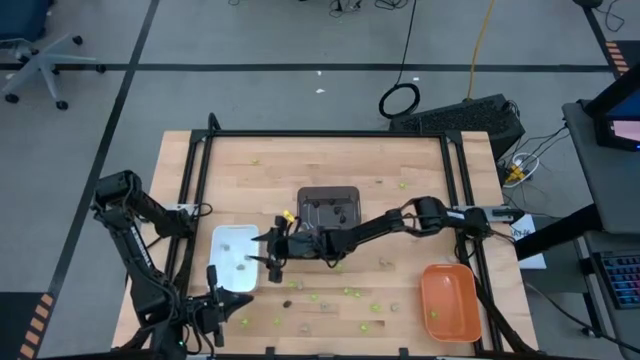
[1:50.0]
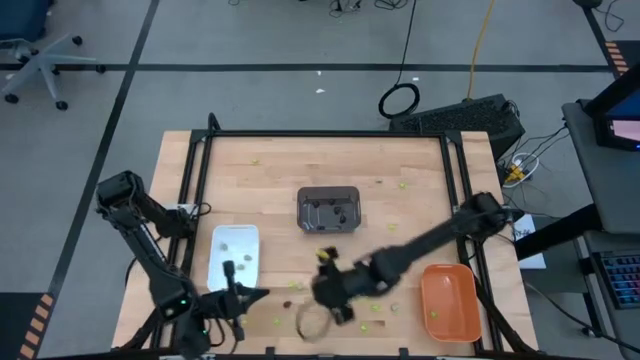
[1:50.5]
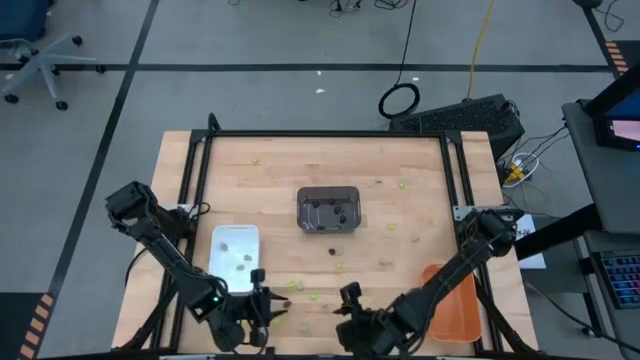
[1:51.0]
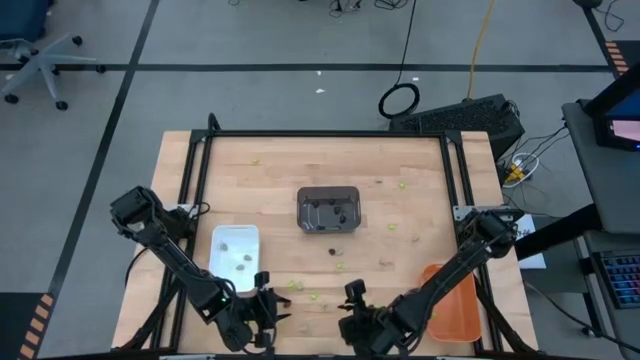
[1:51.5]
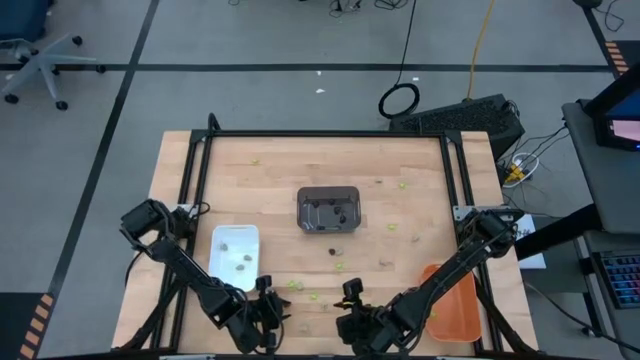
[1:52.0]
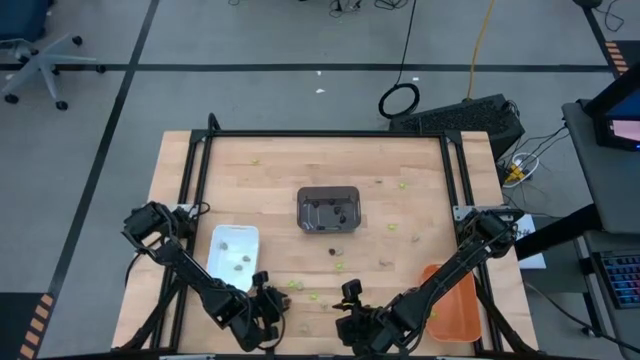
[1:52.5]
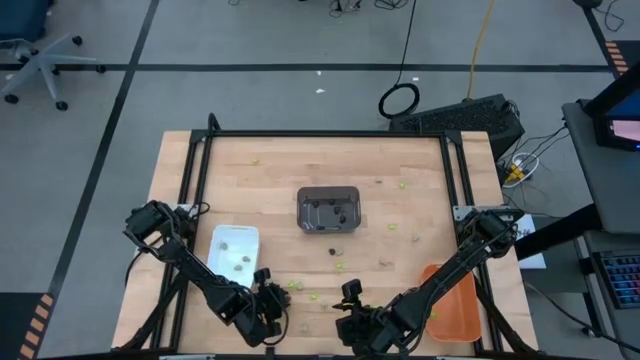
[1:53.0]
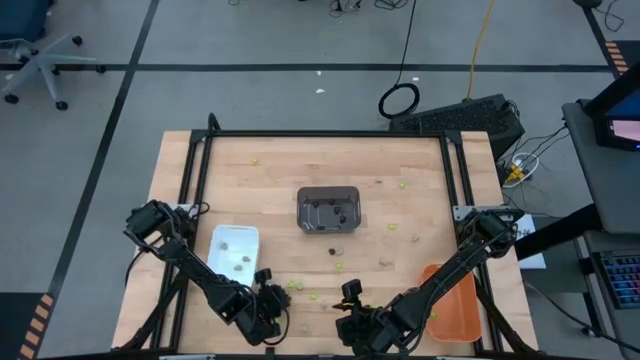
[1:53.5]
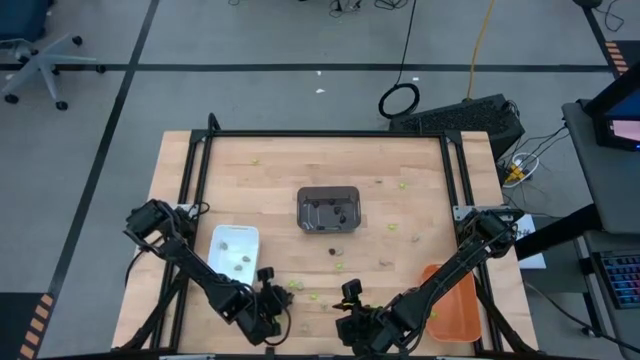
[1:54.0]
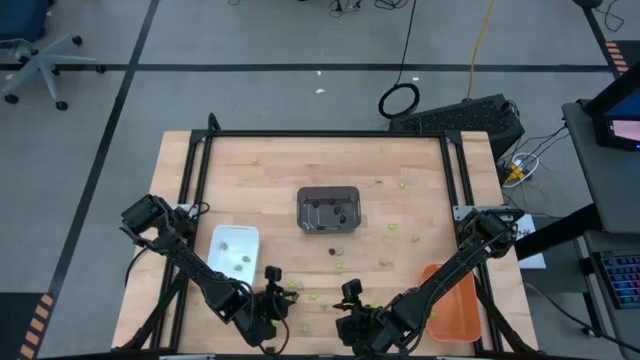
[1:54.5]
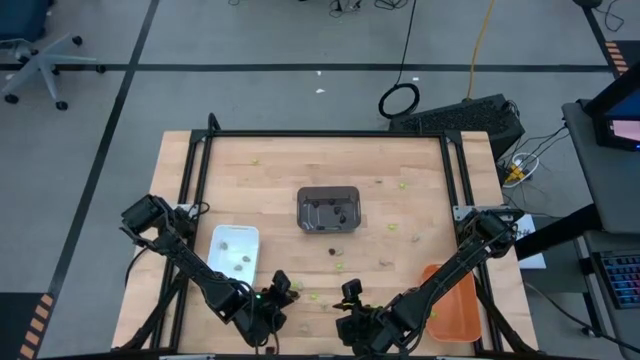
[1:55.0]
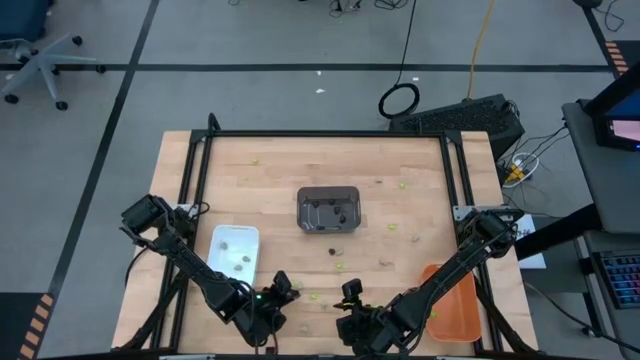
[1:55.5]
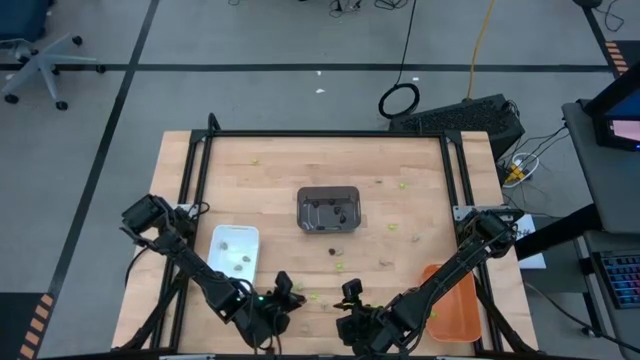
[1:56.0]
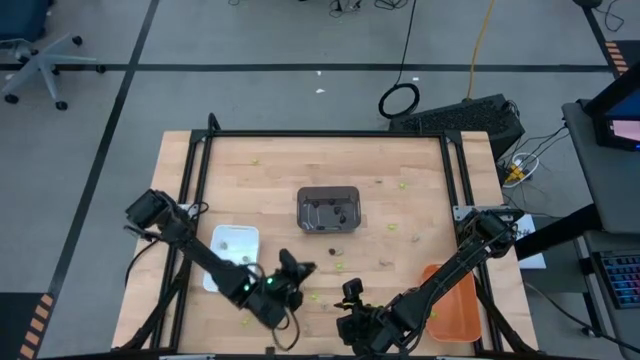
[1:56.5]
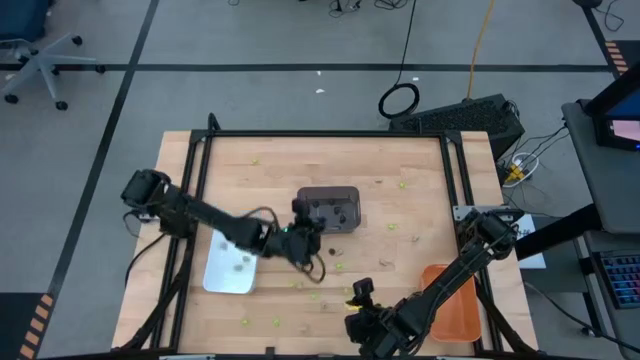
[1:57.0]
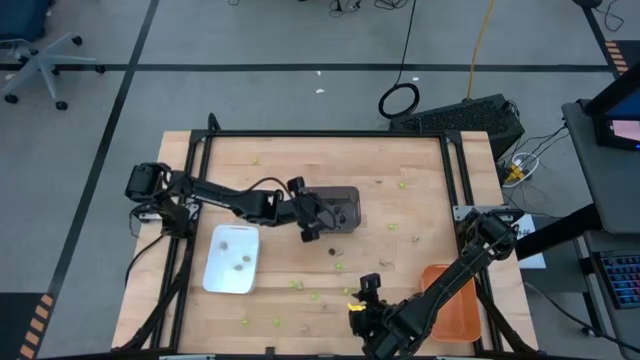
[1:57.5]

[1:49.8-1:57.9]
Task: Sort Halloween decoration
Put the black skull toy into the black bin

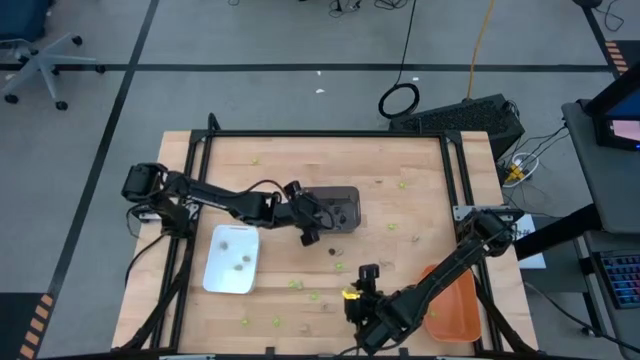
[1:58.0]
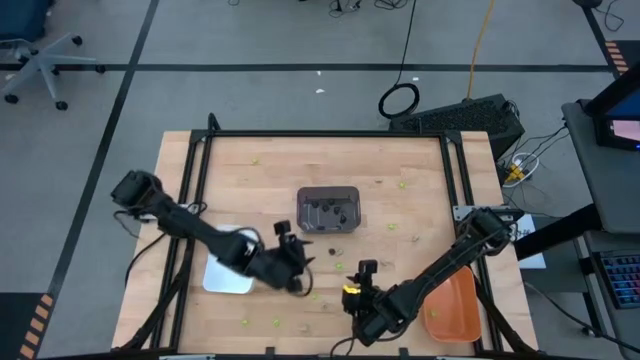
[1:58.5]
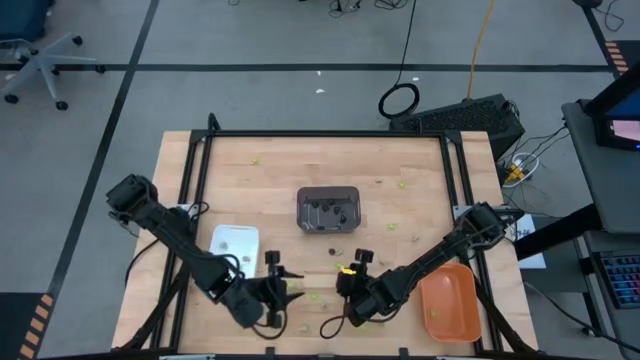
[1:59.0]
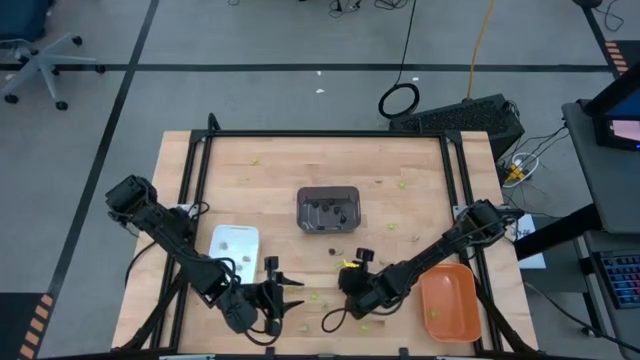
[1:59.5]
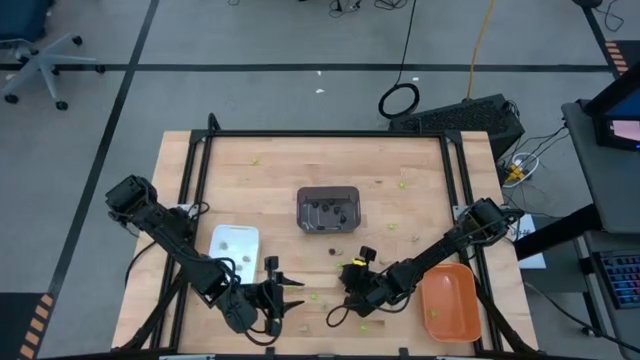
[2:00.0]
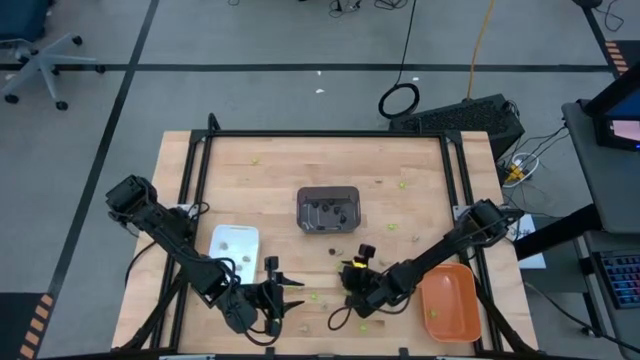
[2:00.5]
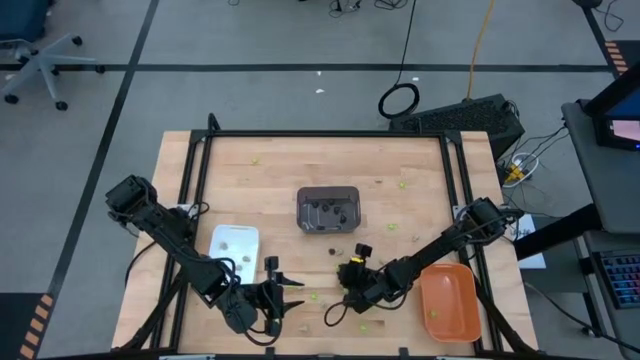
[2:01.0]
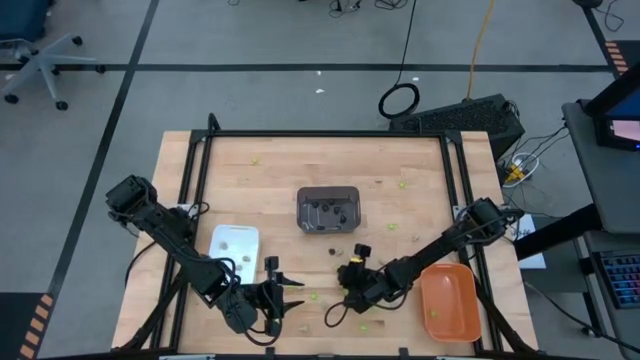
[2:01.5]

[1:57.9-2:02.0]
Put the green spider toy into the orange bin

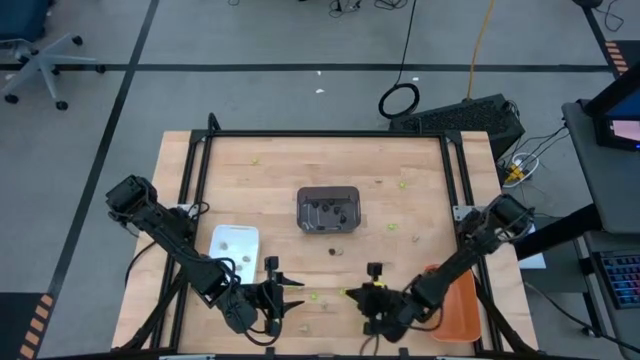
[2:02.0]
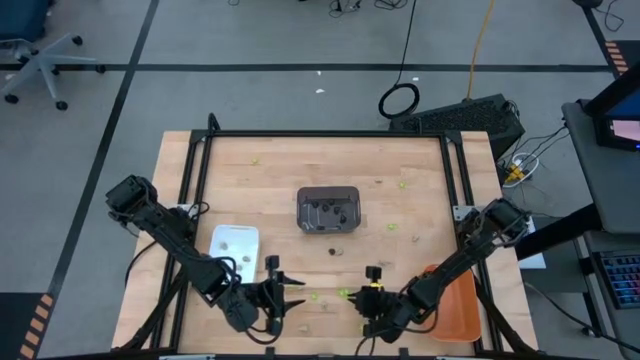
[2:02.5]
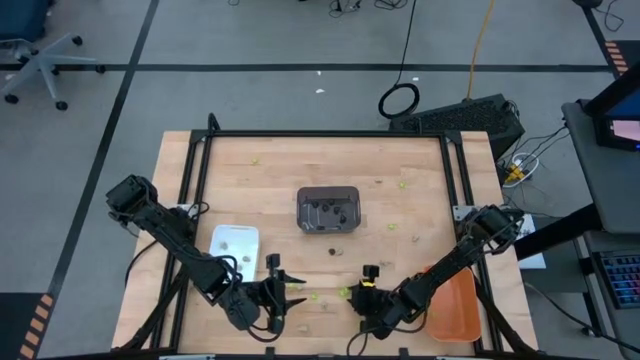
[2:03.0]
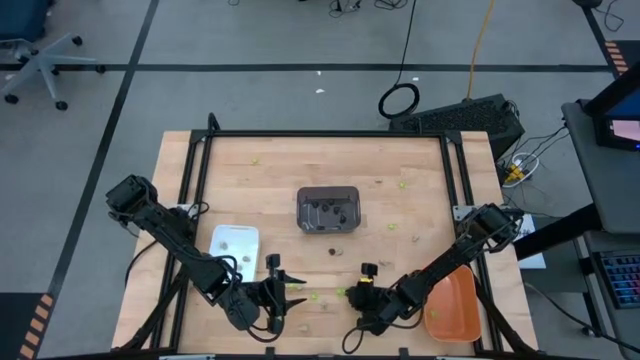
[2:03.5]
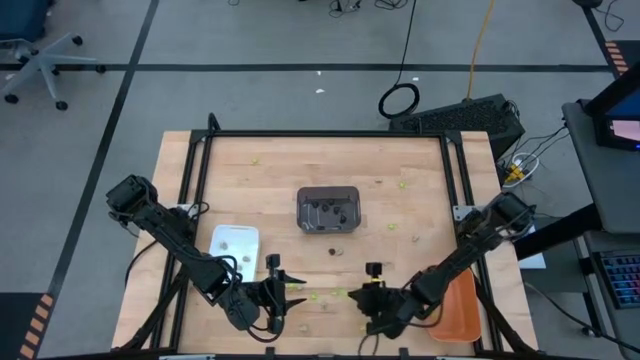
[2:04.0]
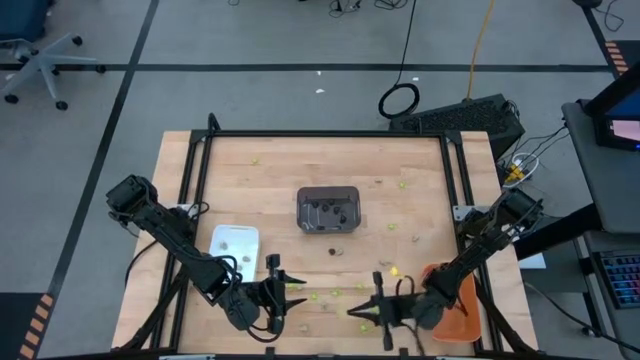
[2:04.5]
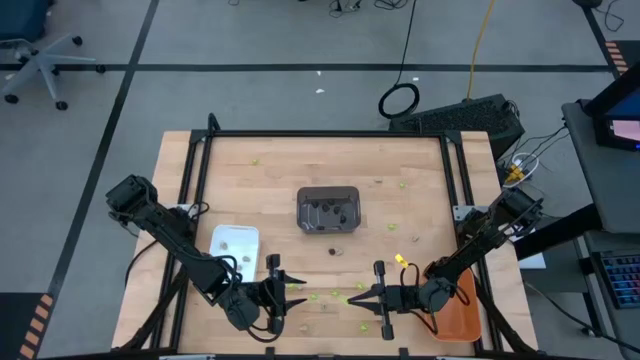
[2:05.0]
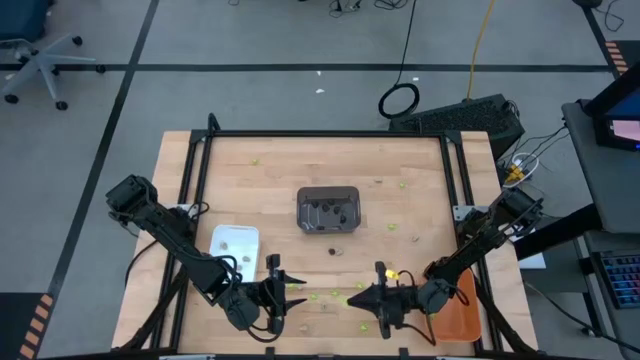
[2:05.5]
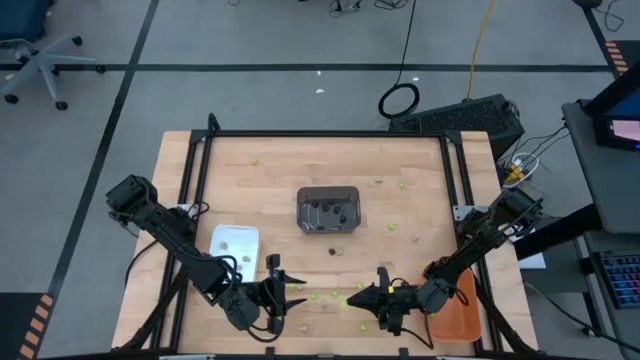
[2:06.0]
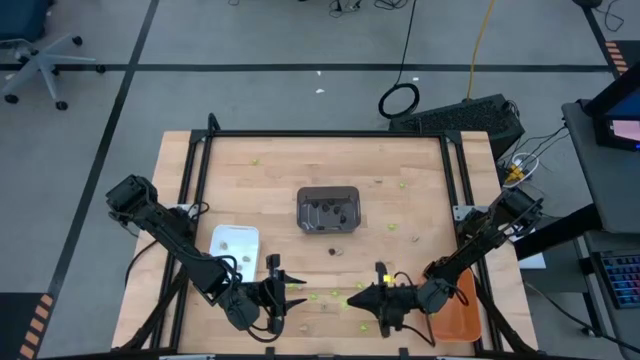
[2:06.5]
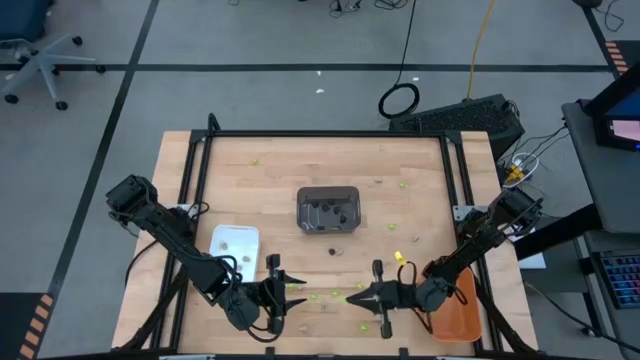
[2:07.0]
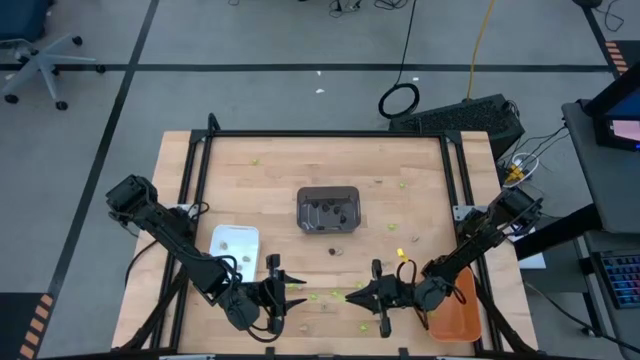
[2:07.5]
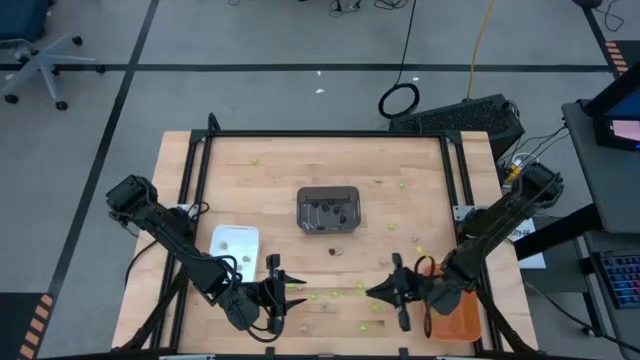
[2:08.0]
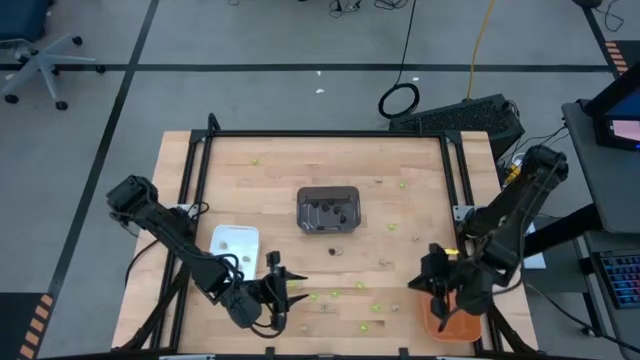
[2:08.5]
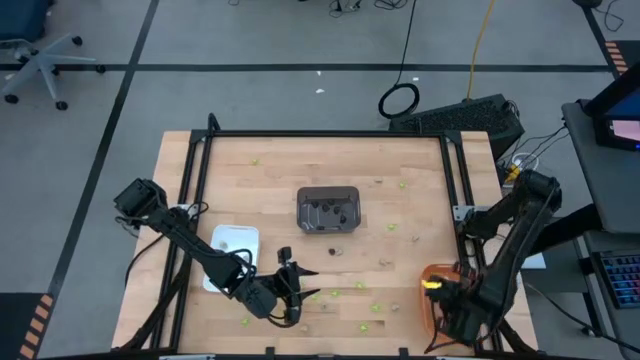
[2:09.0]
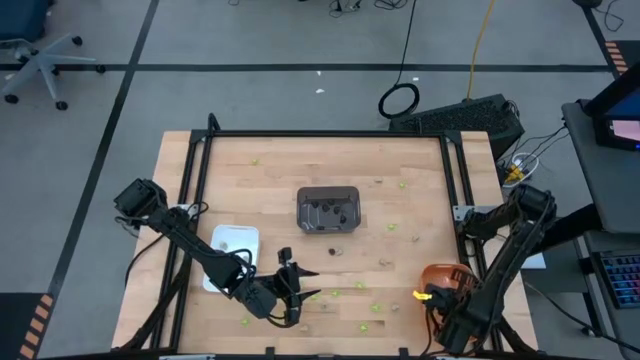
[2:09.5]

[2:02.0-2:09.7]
Put the green spider toy into the orange bin

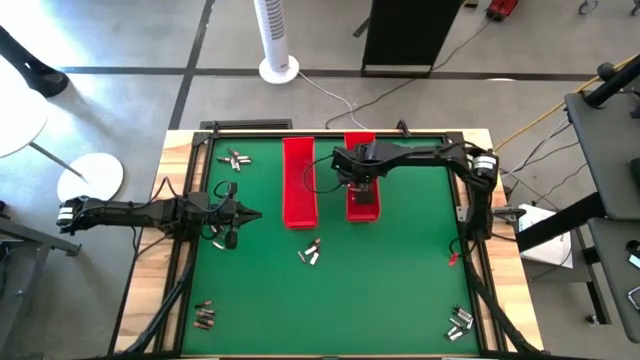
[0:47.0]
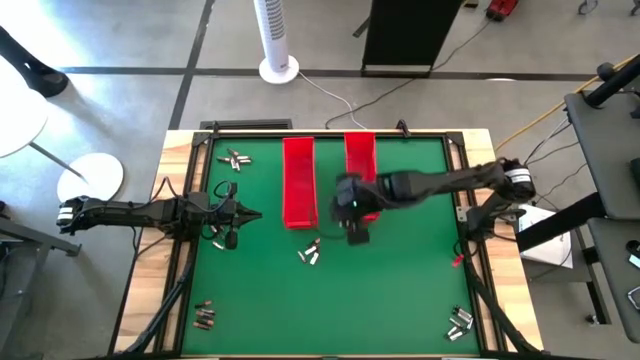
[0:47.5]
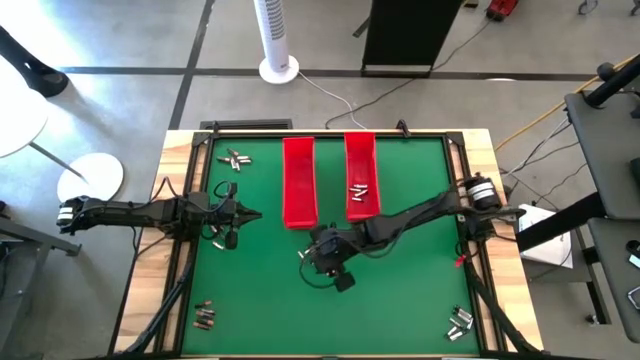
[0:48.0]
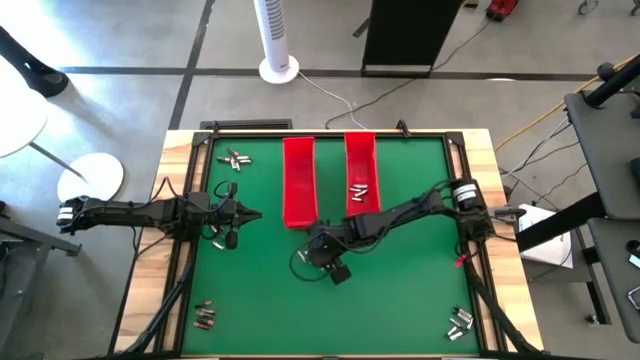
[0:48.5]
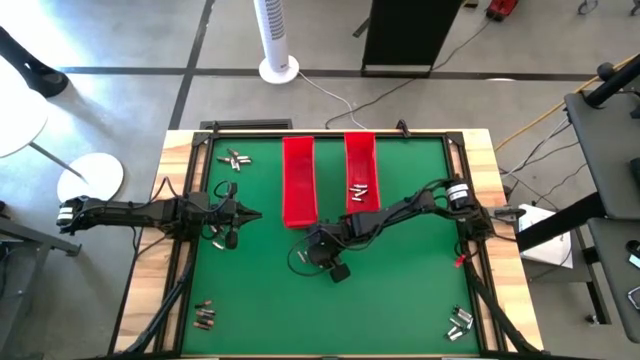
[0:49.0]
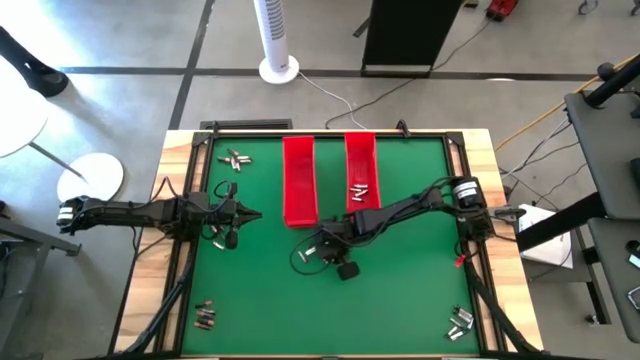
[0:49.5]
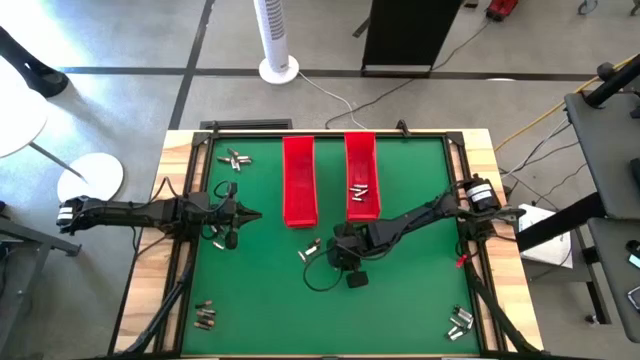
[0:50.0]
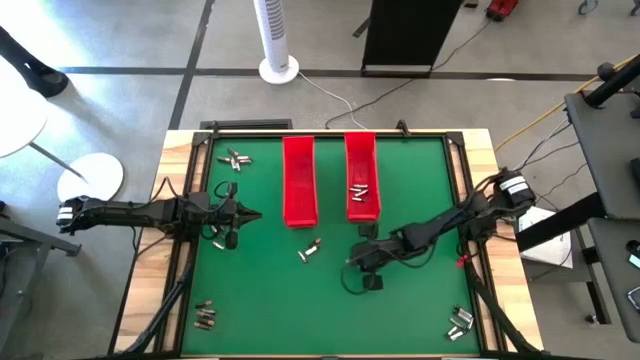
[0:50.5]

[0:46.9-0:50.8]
Task: Sort batteries
Put the silver battery into the right red bin
